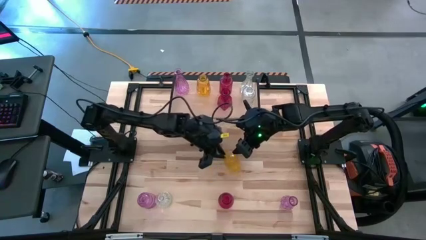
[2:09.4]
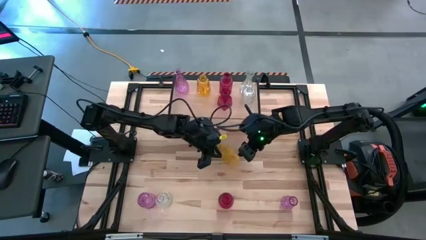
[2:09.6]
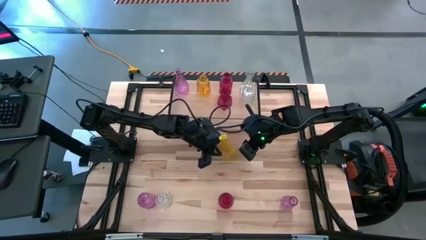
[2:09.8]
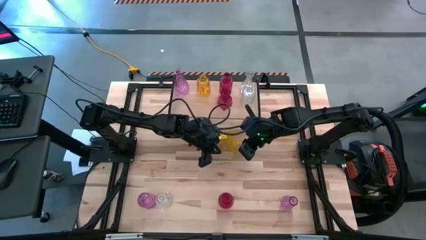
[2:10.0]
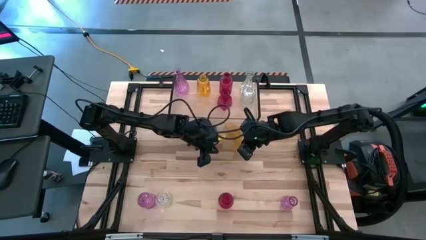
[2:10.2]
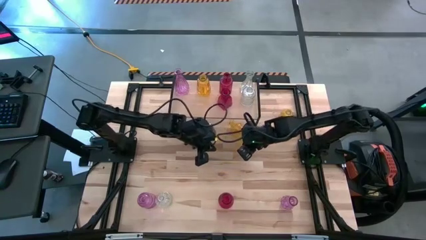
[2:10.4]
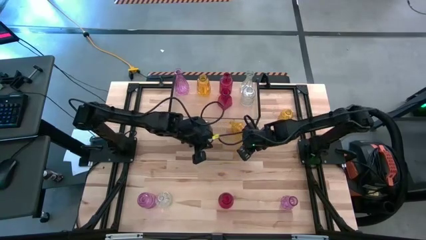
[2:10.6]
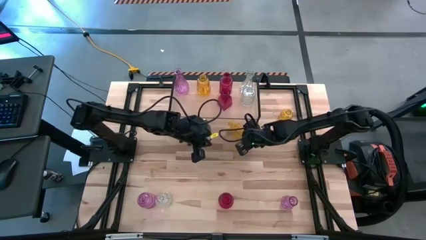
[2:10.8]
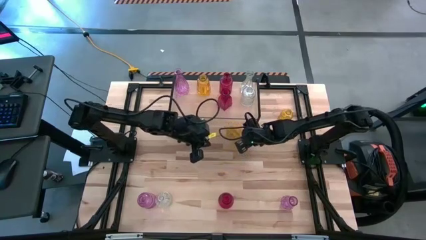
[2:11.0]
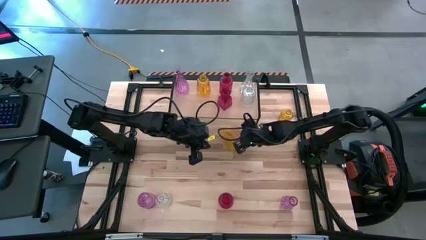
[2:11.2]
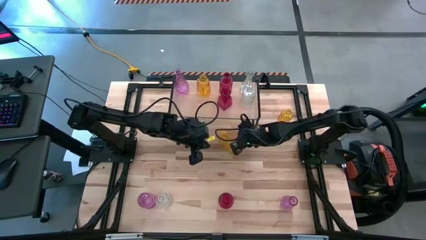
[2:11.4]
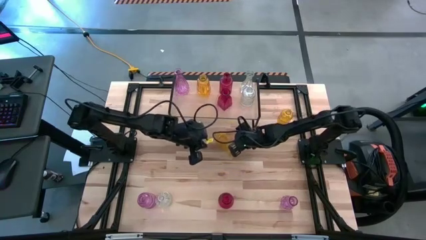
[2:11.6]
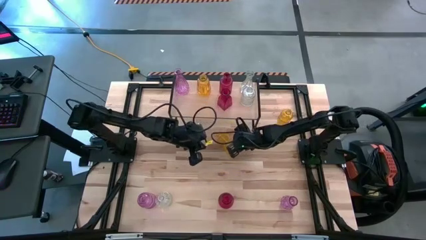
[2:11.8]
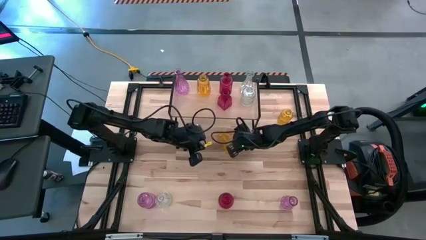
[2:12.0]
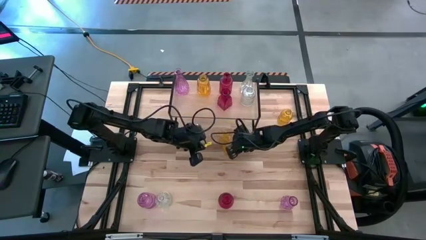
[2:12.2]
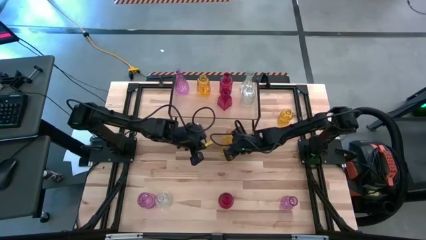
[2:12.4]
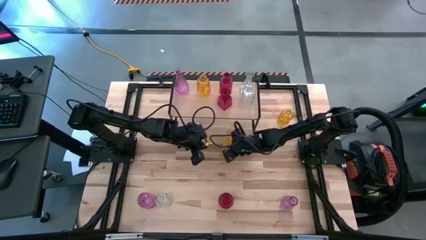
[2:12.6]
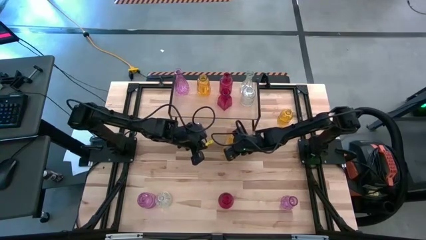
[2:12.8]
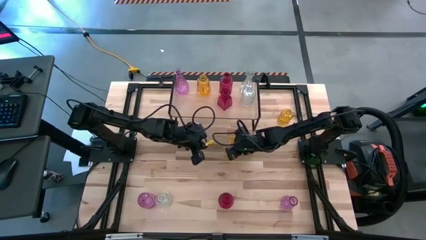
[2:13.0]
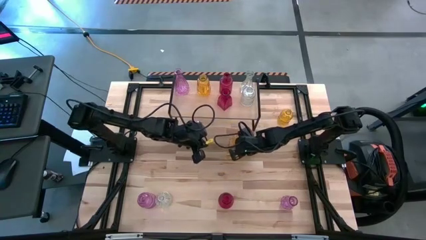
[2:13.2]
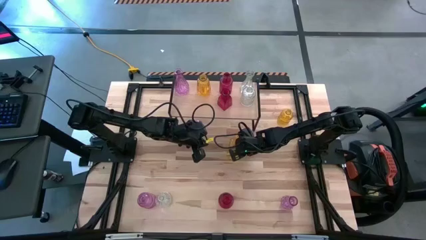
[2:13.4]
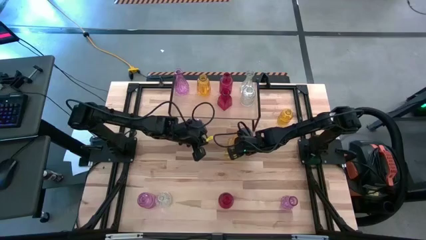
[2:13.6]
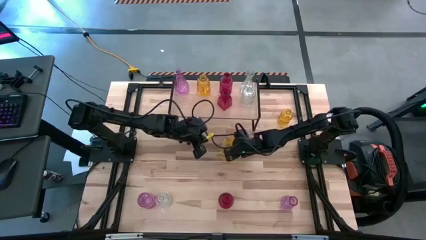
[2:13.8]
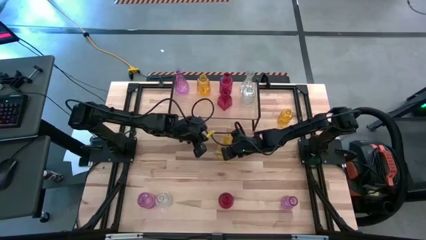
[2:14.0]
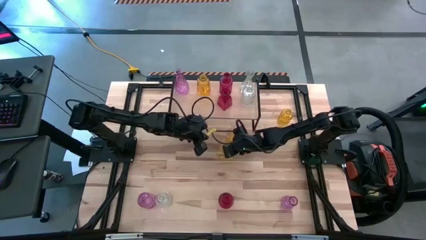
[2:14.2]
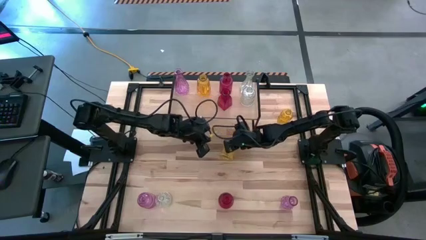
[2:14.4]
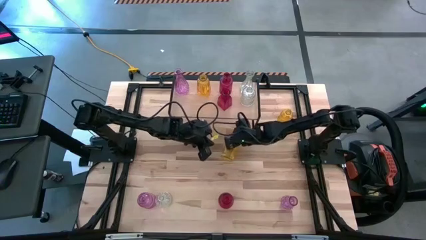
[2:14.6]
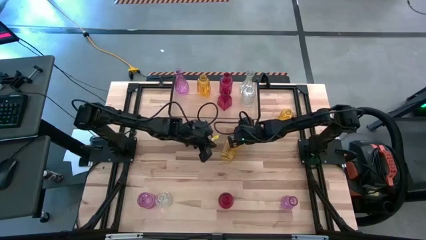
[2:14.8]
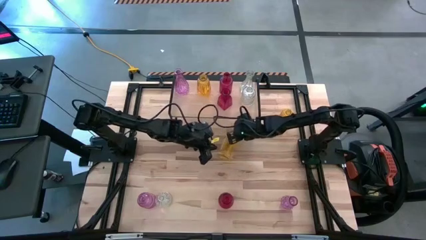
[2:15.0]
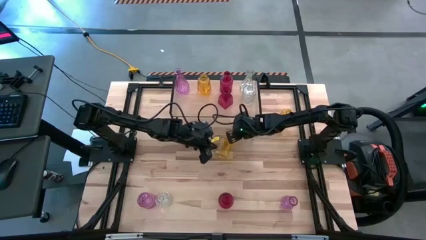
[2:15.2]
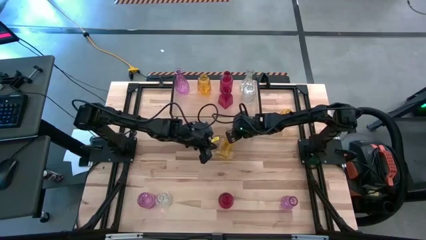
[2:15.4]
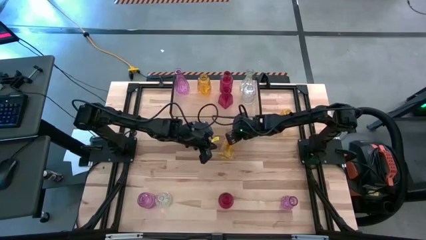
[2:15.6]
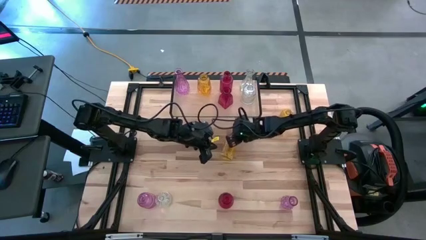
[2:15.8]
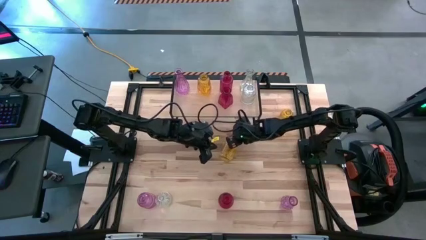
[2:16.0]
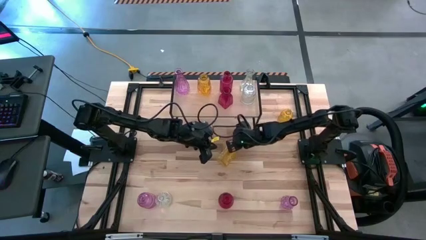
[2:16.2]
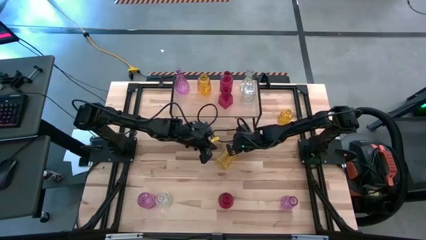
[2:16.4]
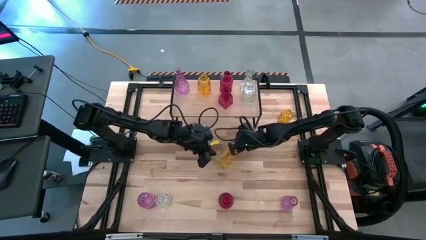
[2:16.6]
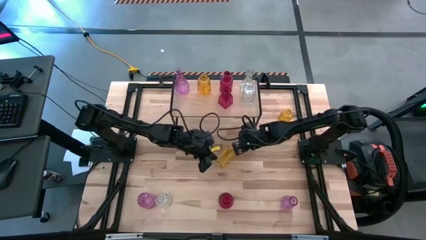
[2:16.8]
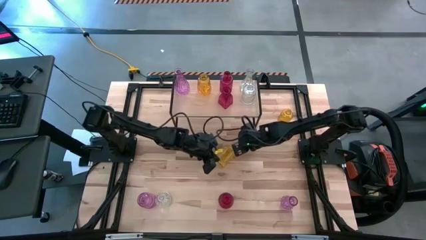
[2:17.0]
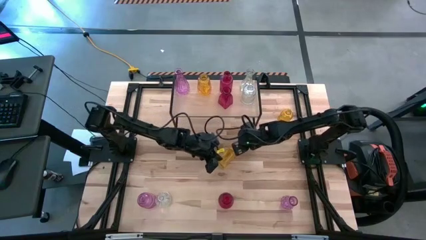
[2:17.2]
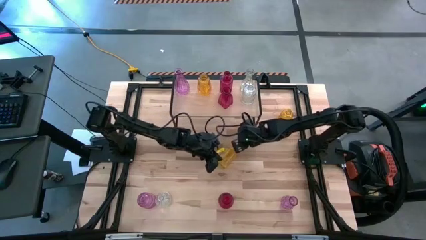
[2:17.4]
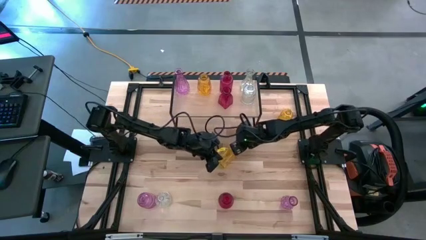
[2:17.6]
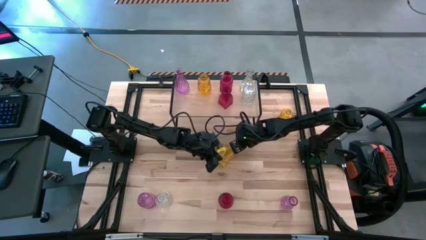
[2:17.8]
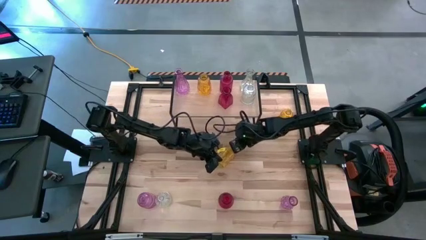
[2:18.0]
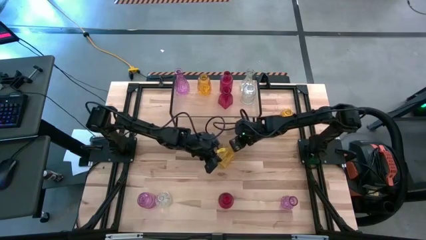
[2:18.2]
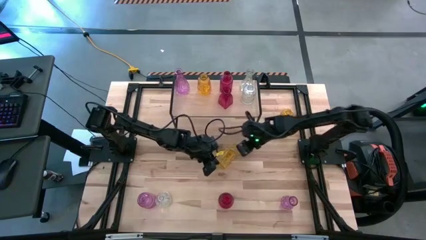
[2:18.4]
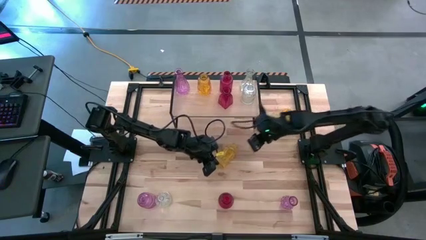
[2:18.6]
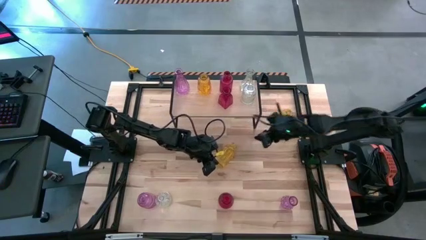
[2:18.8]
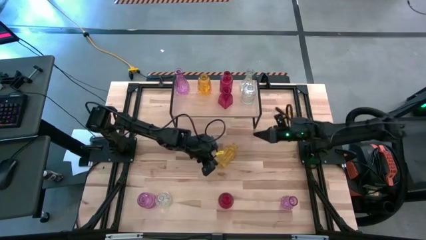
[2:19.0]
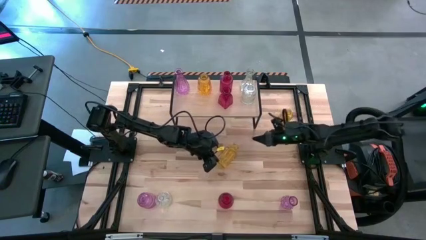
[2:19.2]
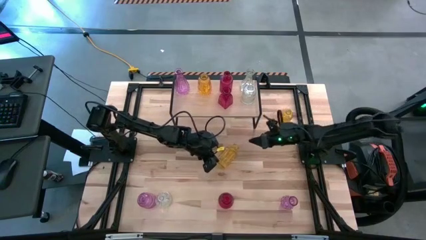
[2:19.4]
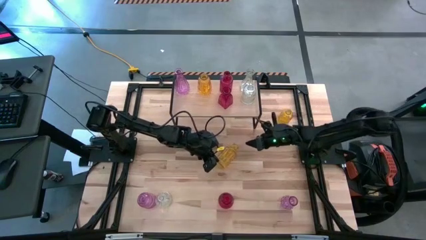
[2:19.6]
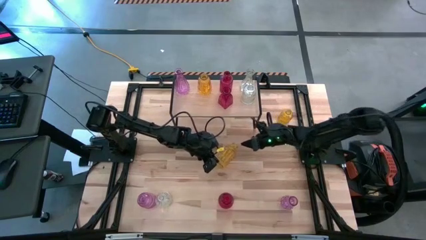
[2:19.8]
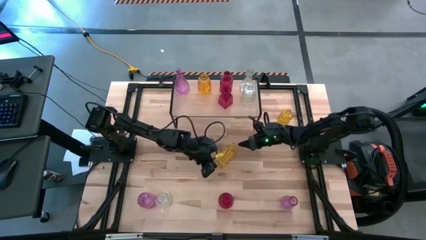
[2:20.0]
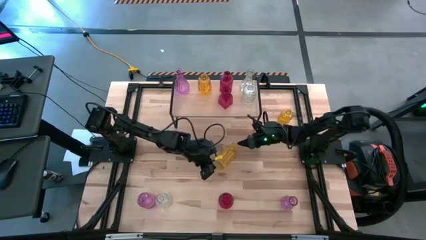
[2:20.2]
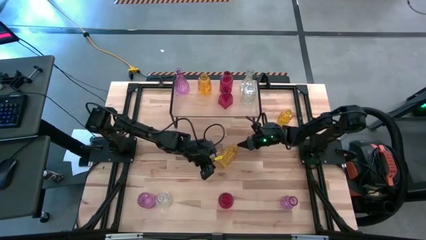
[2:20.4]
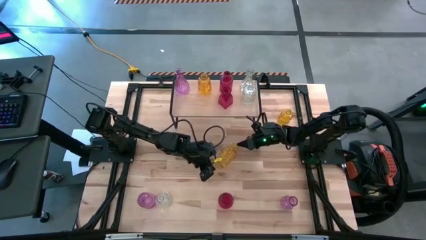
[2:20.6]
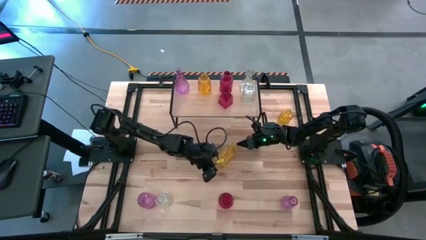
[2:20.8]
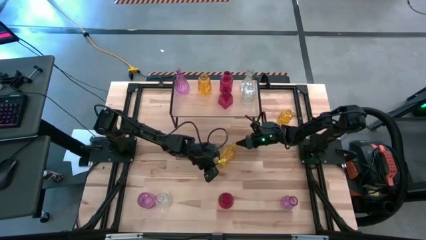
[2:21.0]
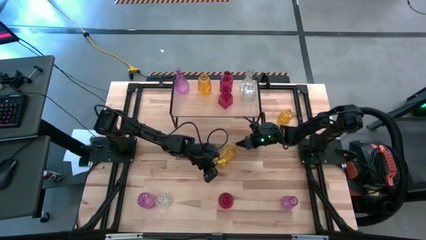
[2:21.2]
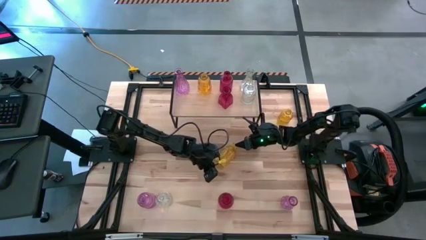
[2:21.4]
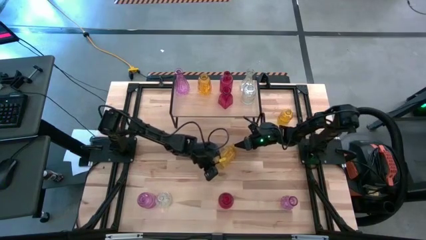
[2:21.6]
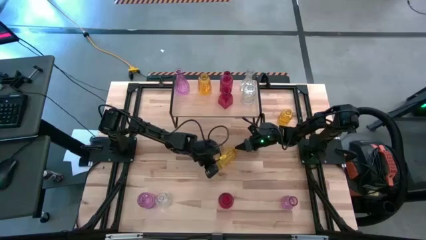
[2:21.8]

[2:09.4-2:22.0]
Task: sort vases onto shelf
Put the bottom yellow vase on the shelf and align it with the other yellow vase

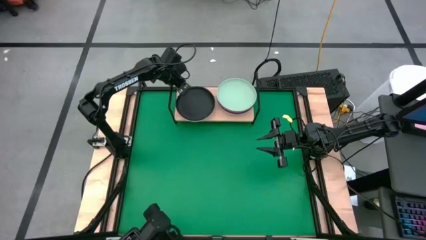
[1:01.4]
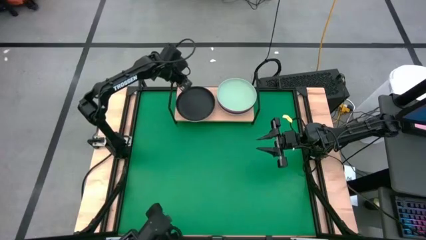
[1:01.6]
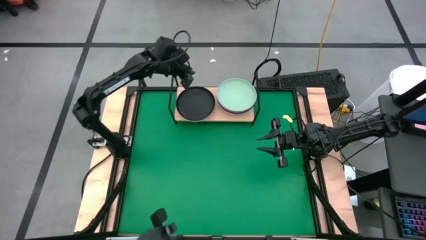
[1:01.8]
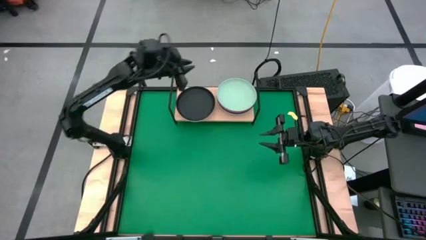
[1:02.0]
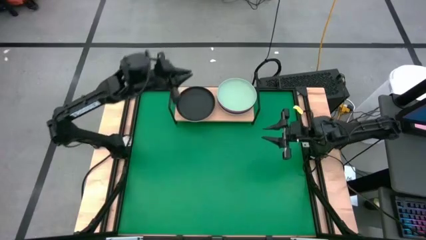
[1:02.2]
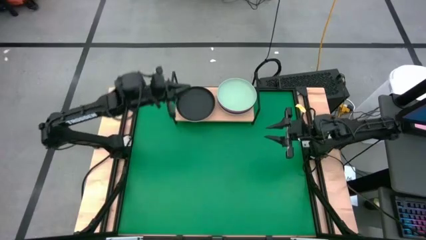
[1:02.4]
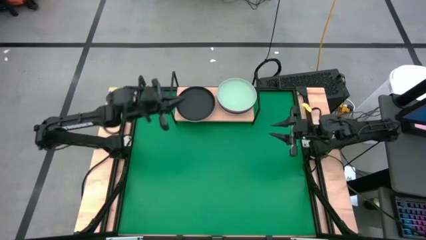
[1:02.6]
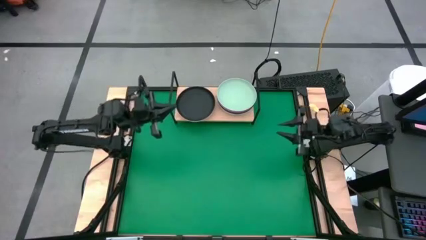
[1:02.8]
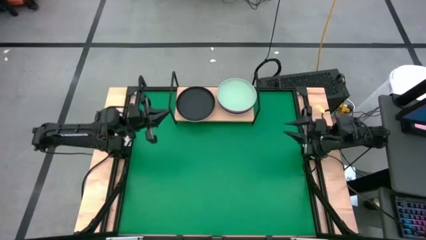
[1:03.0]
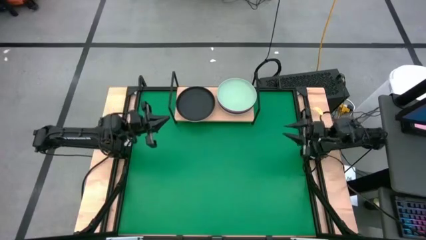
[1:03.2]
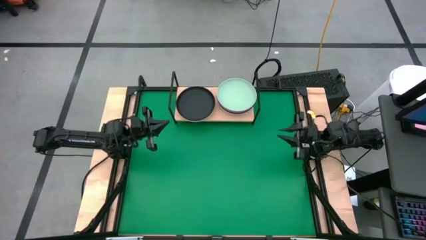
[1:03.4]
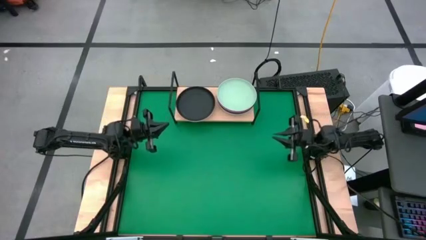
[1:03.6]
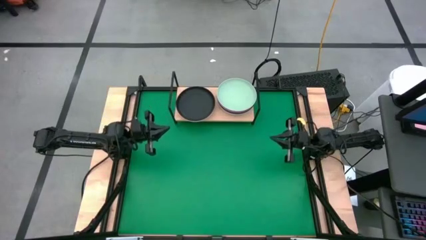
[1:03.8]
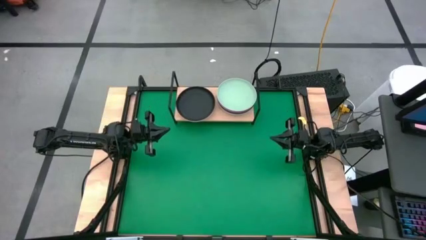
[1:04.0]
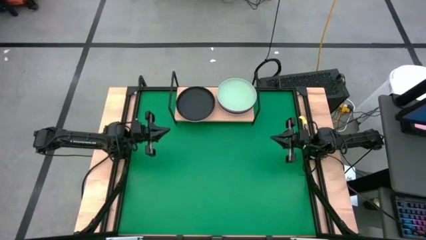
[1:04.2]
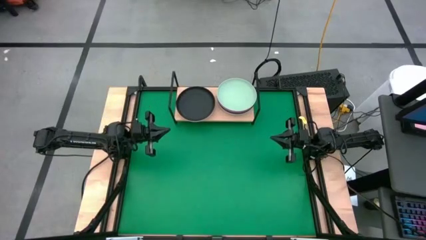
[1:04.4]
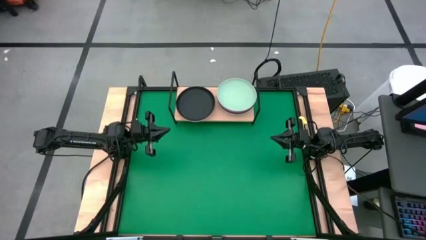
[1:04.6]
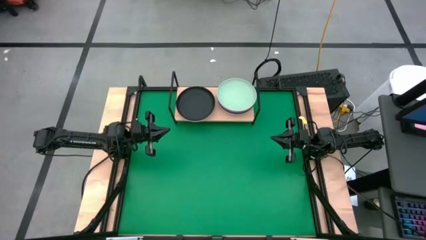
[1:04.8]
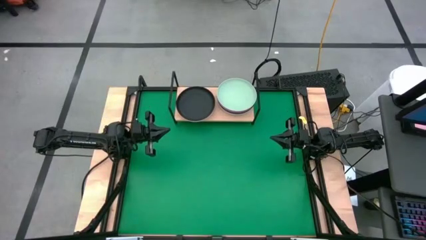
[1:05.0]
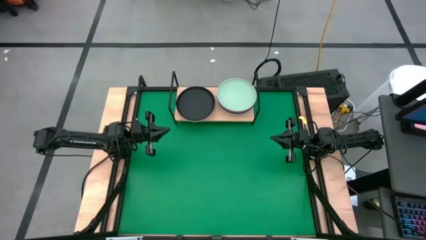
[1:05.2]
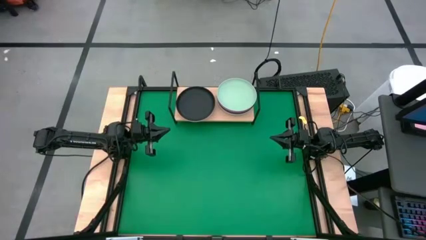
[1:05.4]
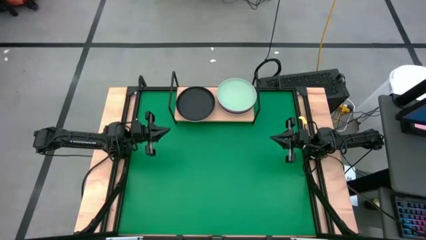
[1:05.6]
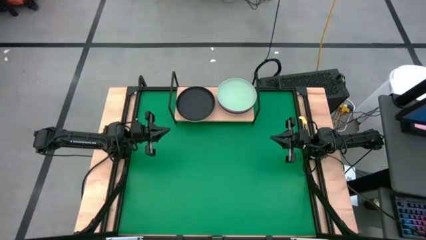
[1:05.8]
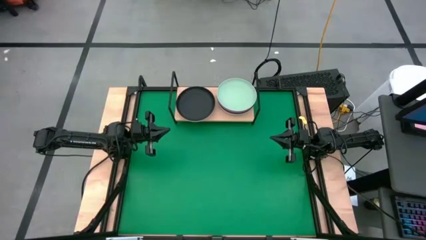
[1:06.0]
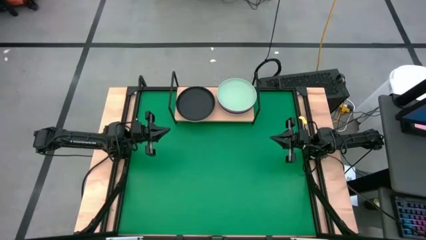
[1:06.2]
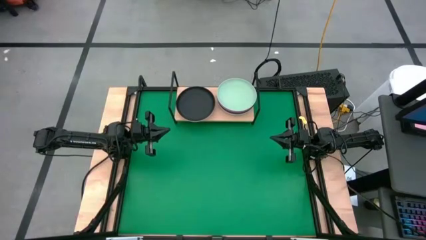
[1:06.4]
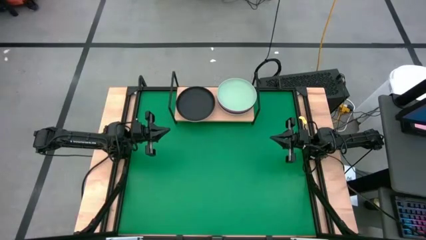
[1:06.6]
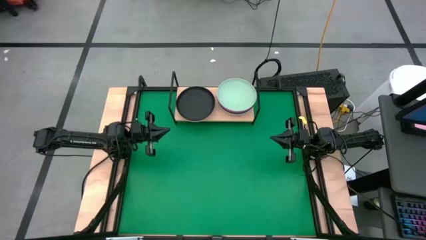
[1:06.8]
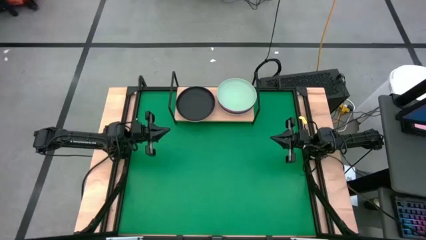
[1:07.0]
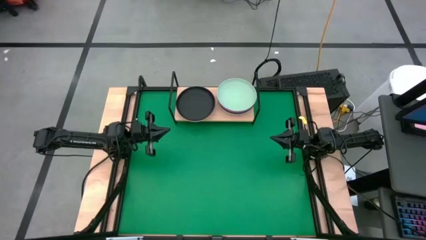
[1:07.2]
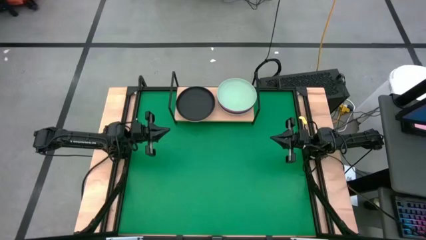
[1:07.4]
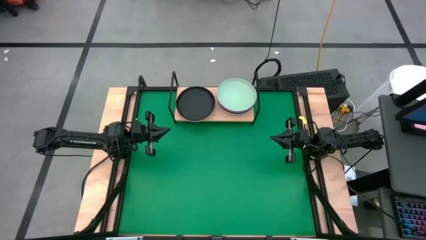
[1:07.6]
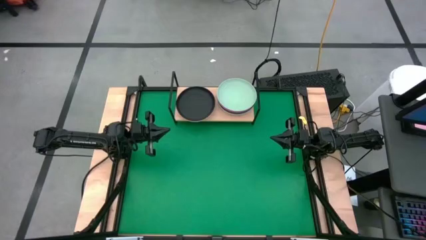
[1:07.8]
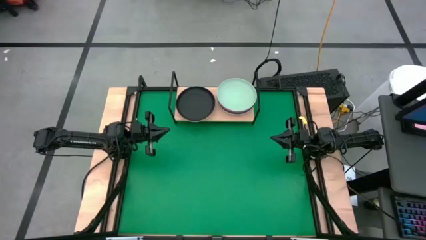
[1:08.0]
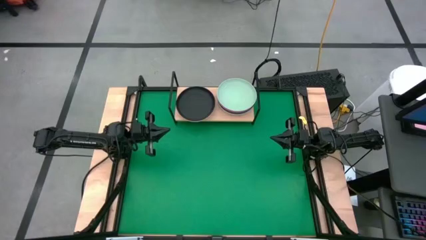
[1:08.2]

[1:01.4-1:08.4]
Task: Place and stack plates onto a shelf
Return to Home Position
